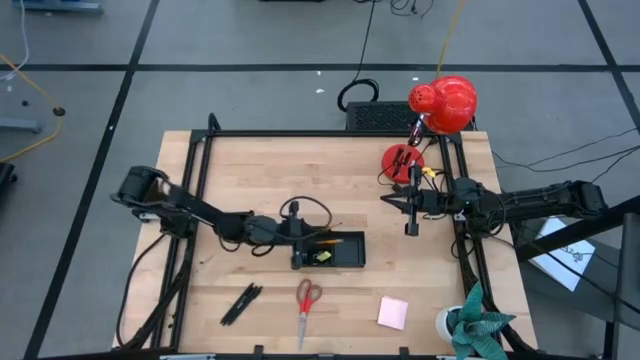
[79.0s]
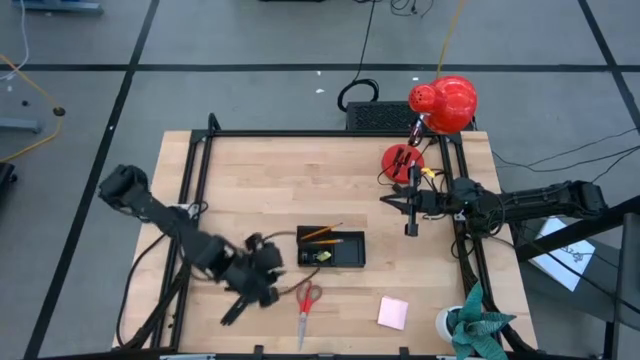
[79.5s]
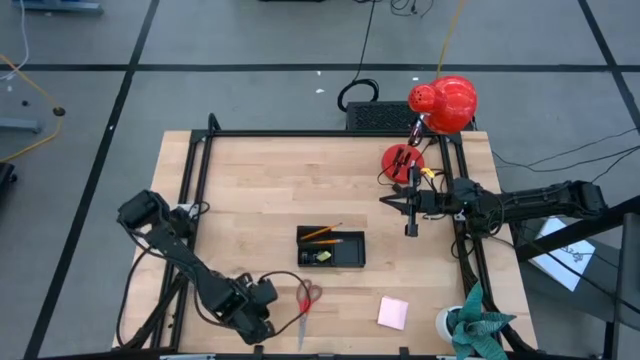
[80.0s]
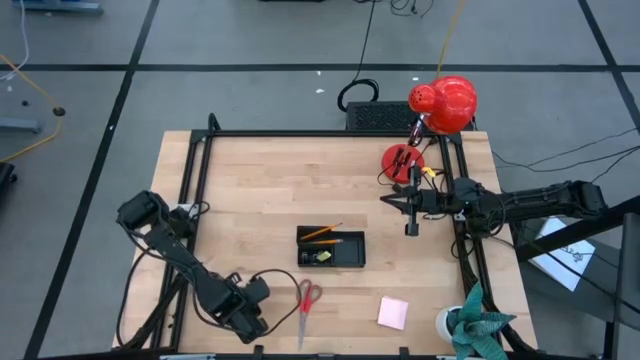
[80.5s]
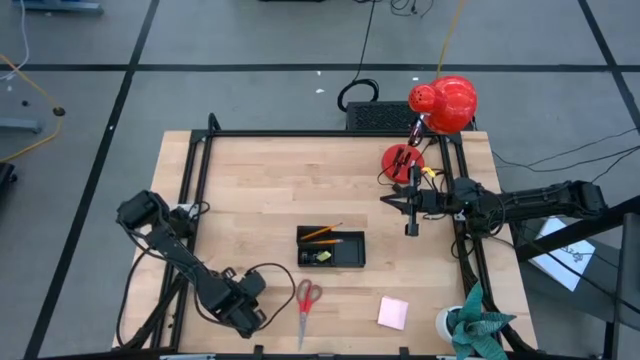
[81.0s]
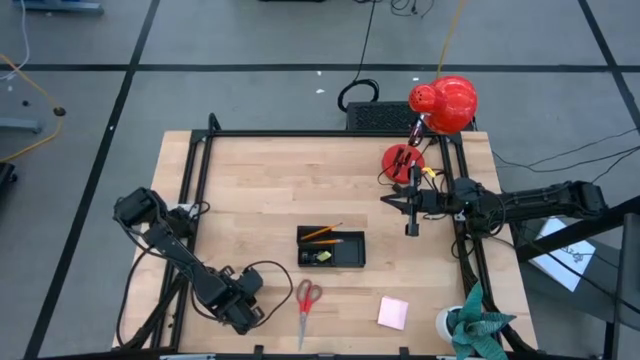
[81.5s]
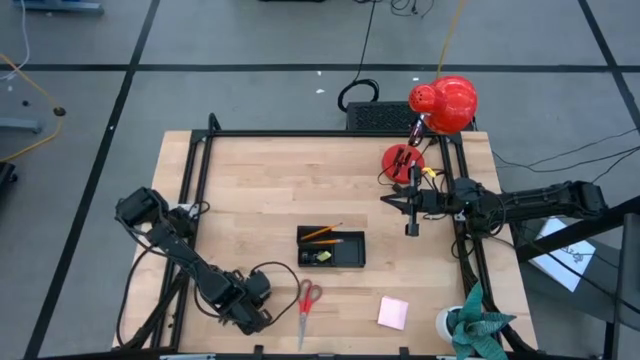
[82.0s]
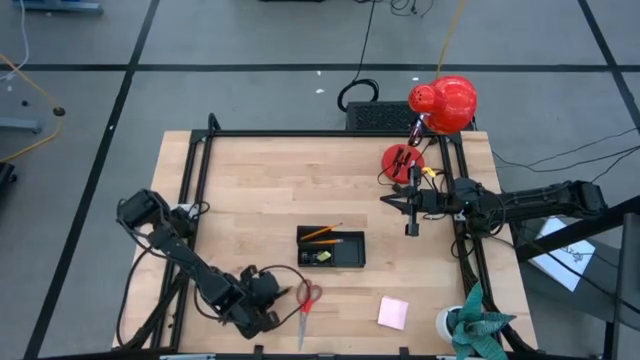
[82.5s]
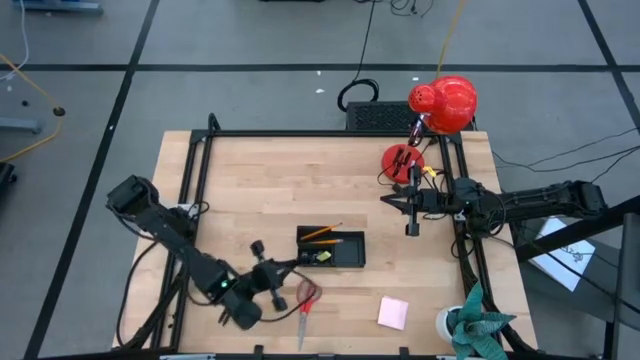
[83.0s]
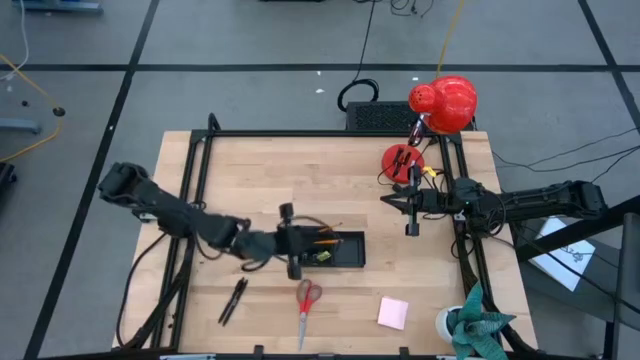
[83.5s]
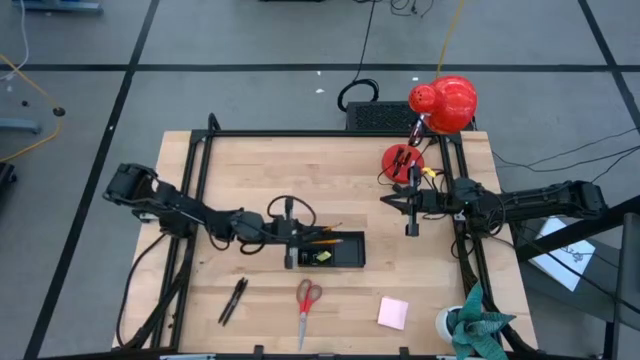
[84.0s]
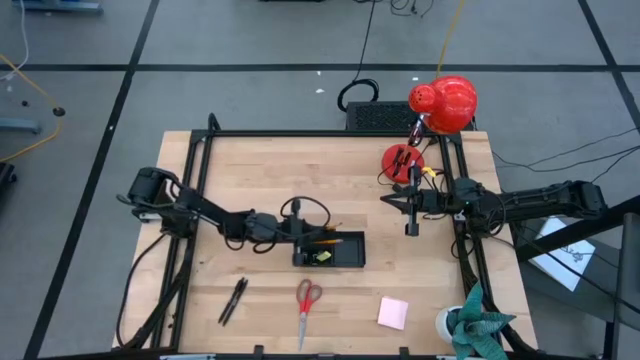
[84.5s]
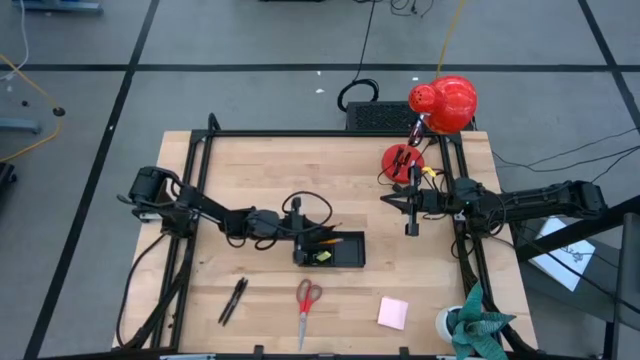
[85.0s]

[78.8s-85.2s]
Task: Pick and place office supplies into organizer
Put the black pen into the black desk organizer

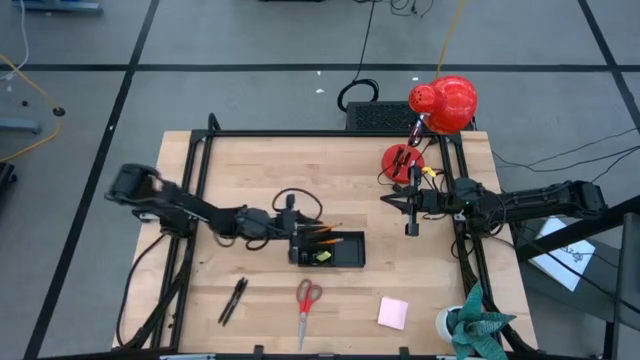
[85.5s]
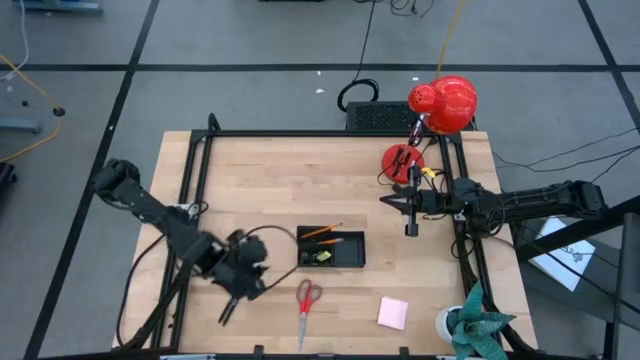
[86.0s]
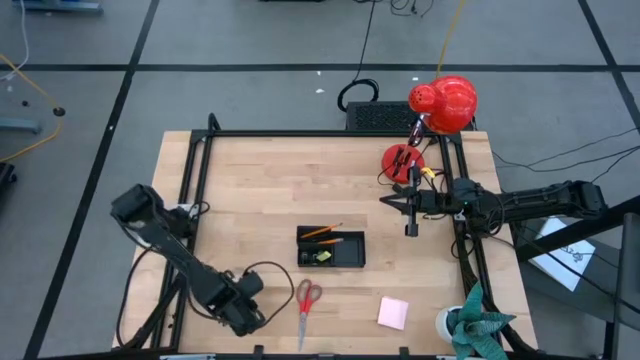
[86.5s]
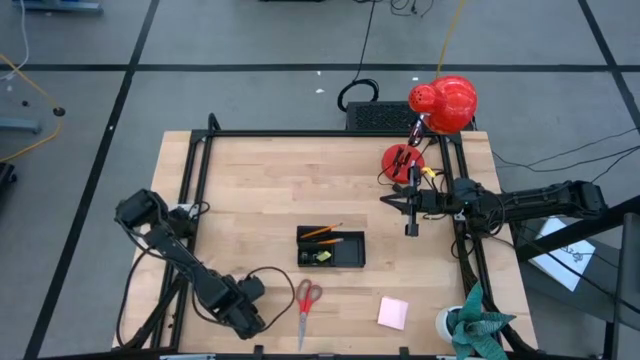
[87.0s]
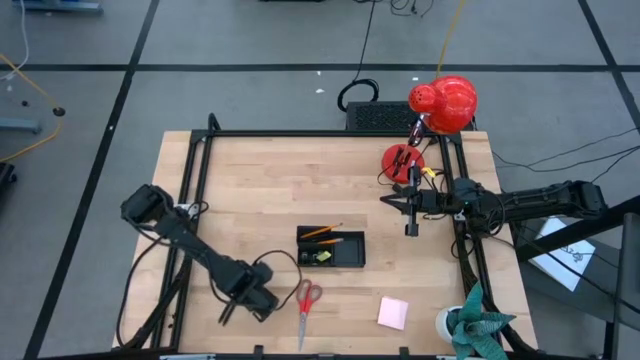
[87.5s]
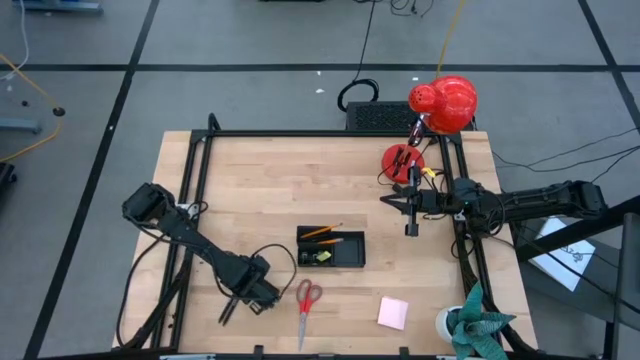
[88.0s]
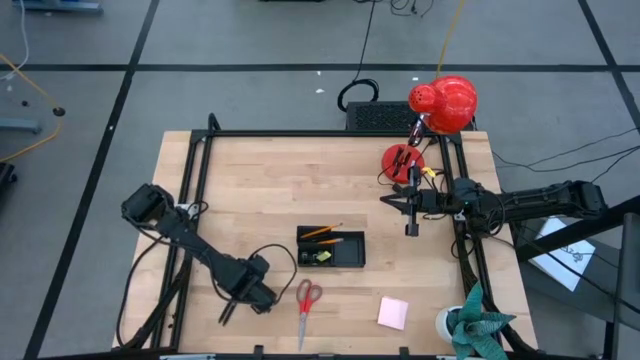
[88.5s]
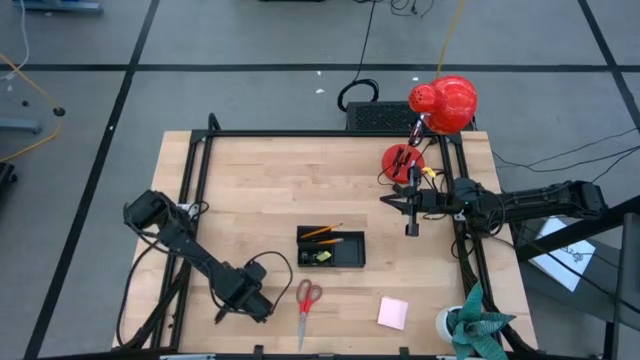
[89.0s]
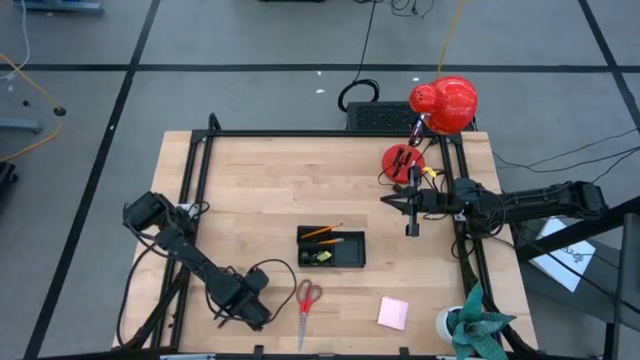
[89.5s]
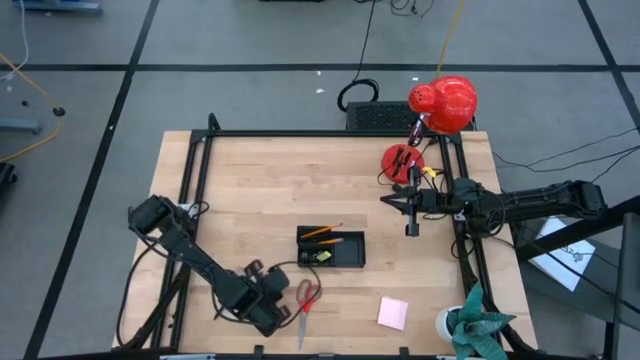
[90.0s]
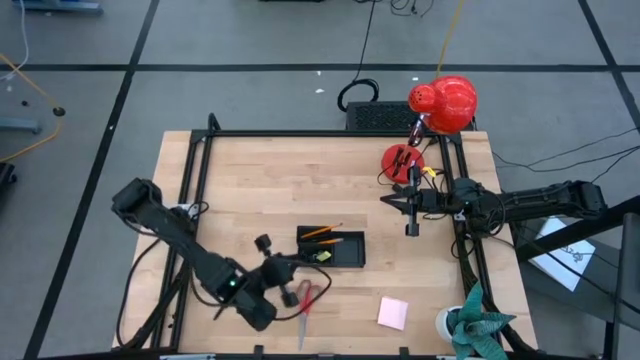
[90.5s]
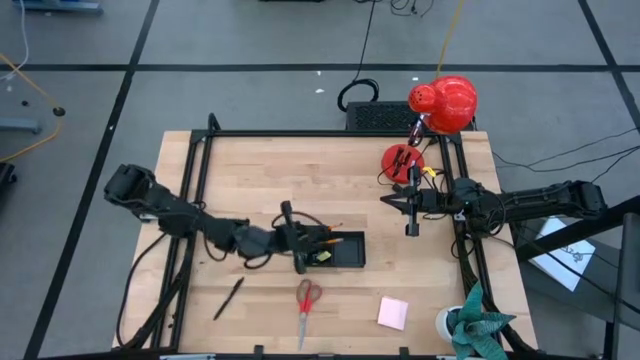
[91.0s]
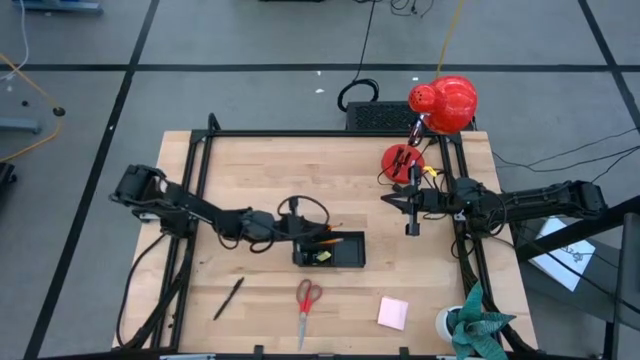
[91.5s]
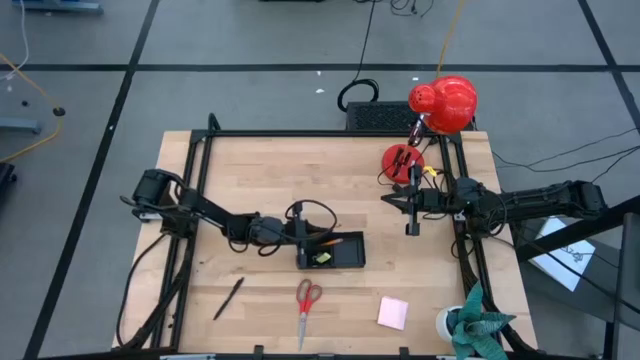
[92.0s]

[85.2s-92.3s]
Put the black pen into the black desk organizer

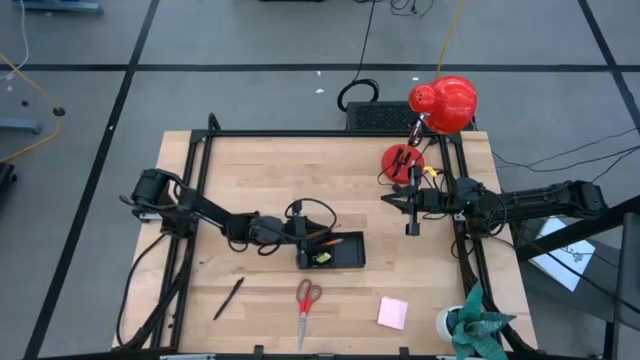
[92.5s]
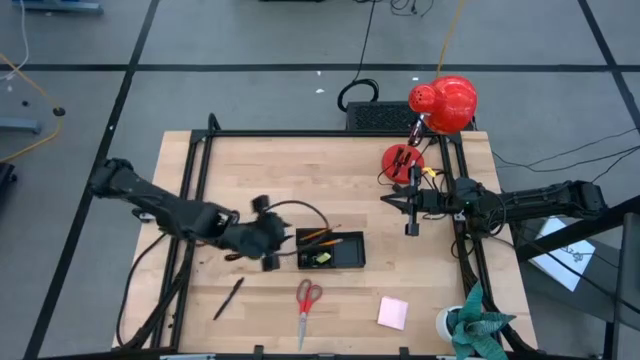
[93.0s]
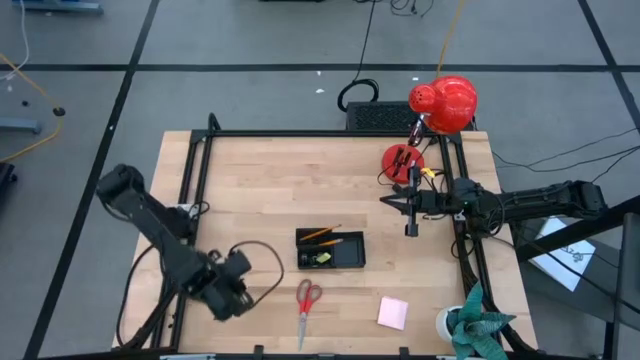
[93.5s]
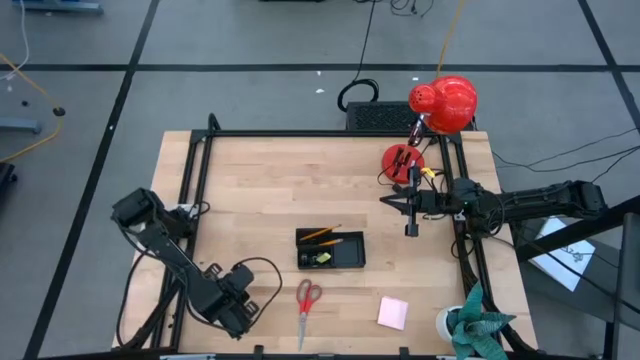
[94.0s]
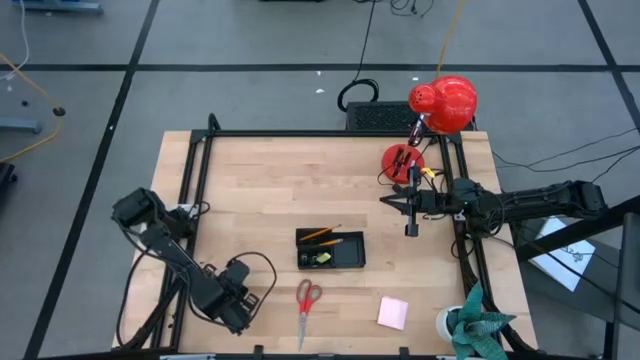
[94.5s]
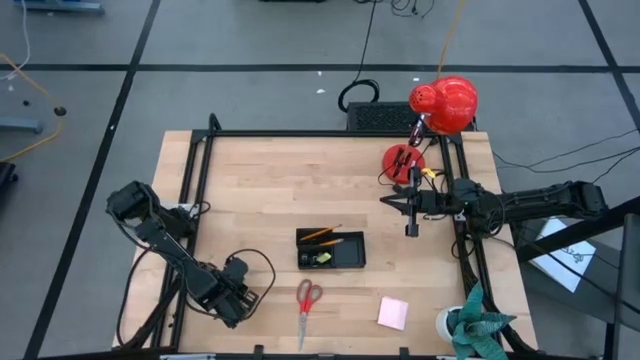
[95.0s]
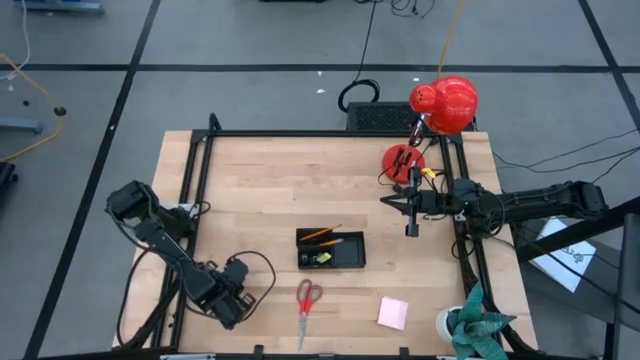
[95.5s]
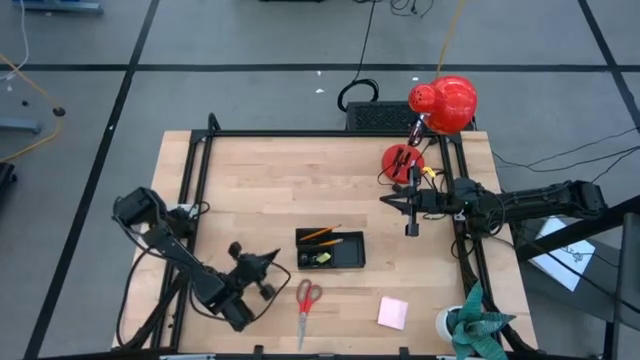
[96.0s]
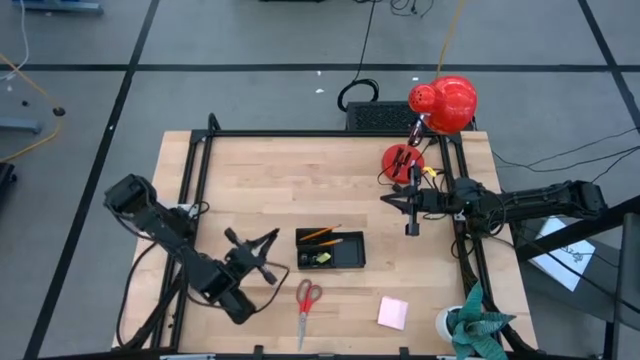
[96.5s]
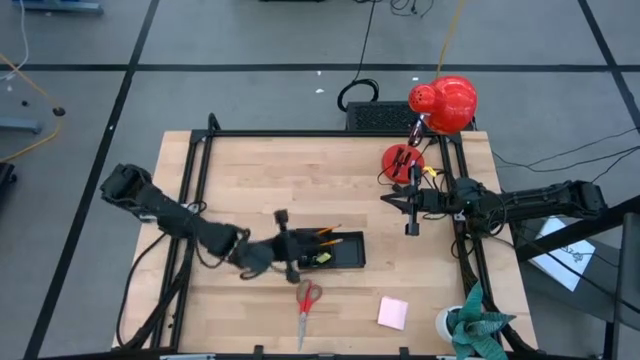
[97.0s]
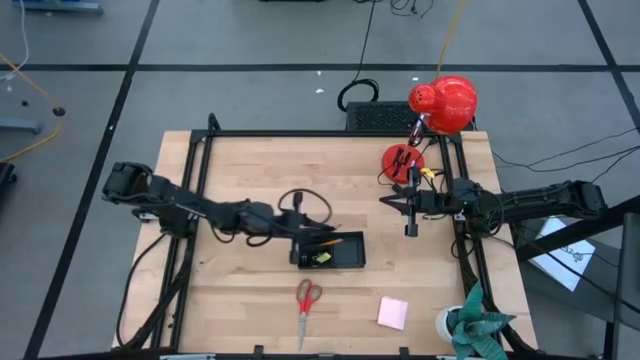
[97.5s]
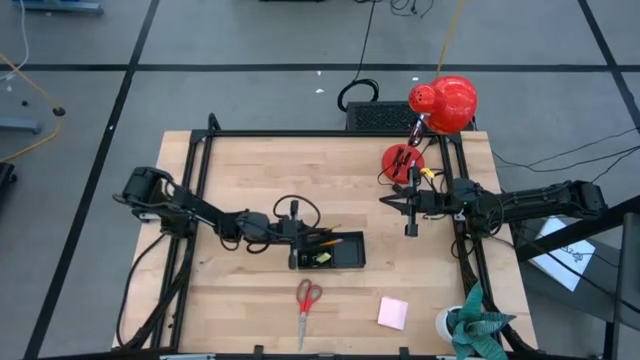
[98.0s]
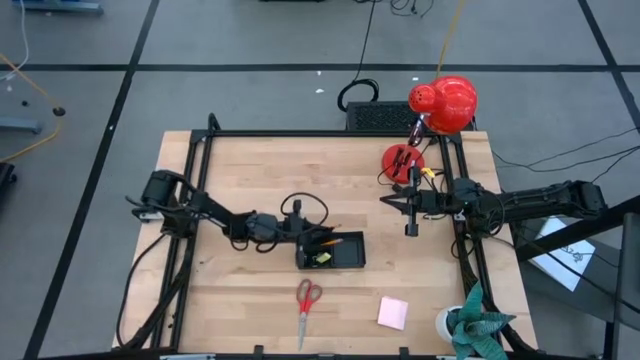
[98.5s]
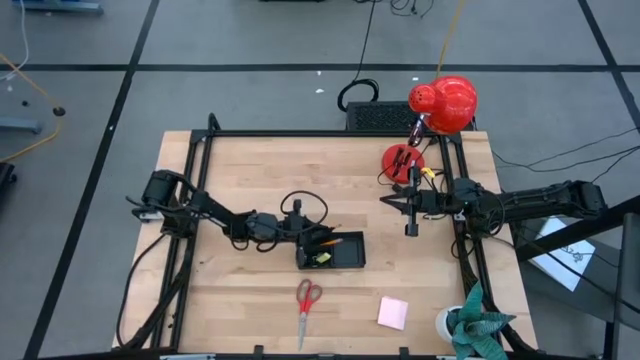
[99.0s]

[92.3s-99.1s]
Put the black pen into the black desk organizer
